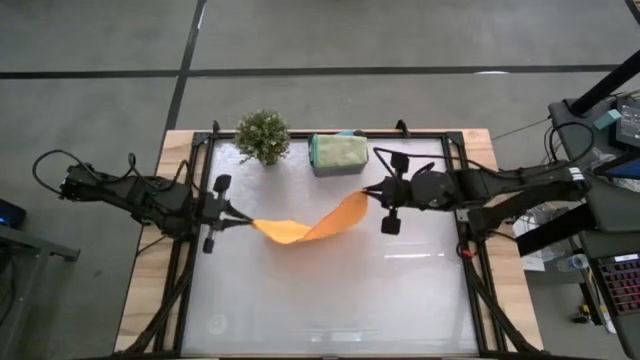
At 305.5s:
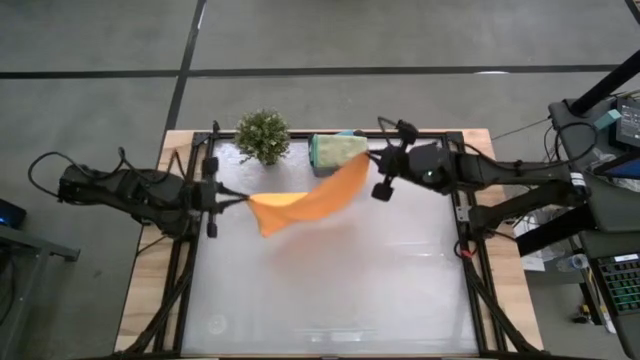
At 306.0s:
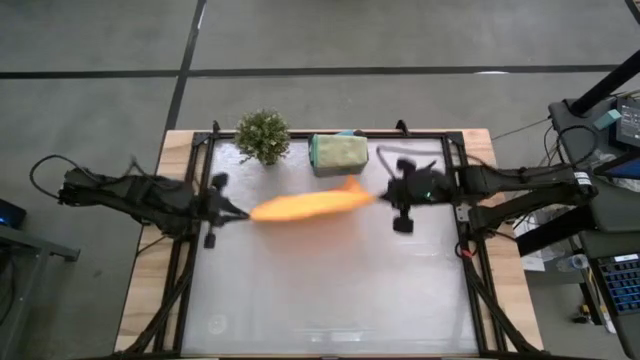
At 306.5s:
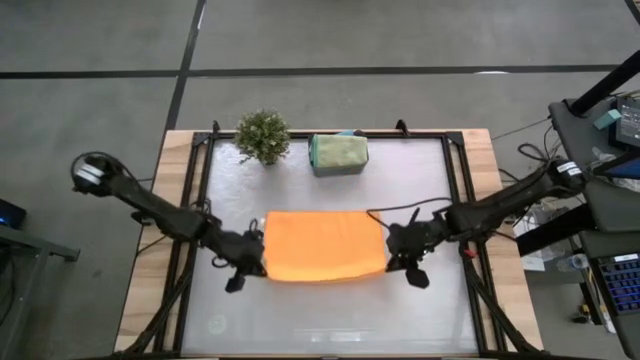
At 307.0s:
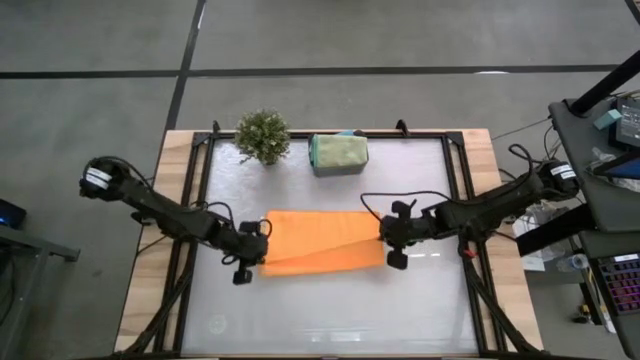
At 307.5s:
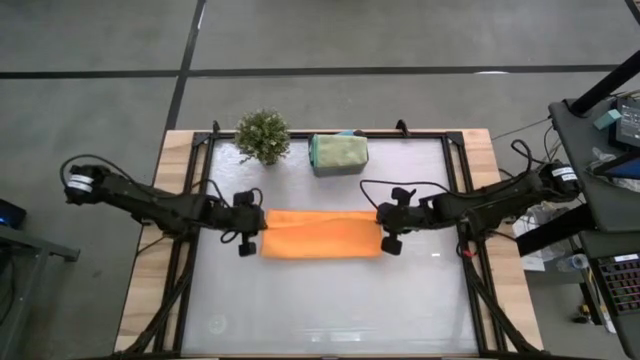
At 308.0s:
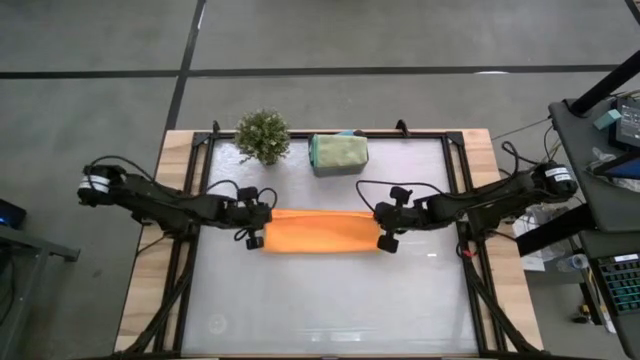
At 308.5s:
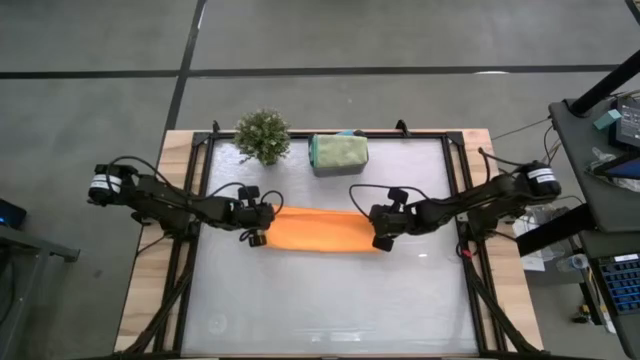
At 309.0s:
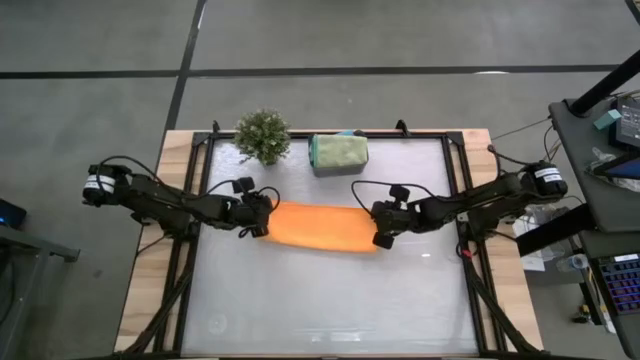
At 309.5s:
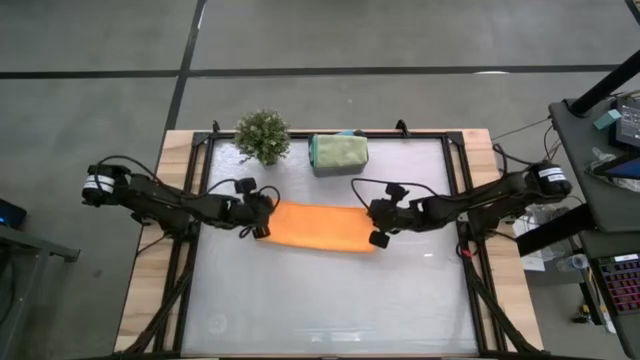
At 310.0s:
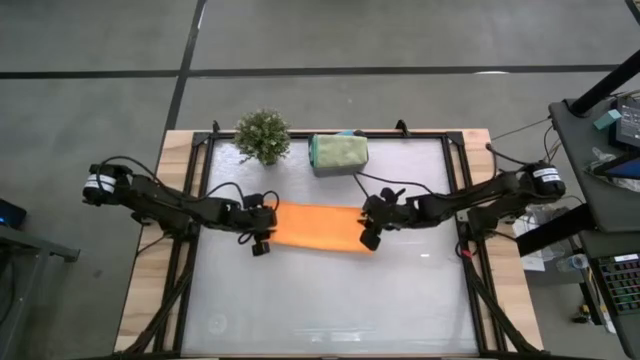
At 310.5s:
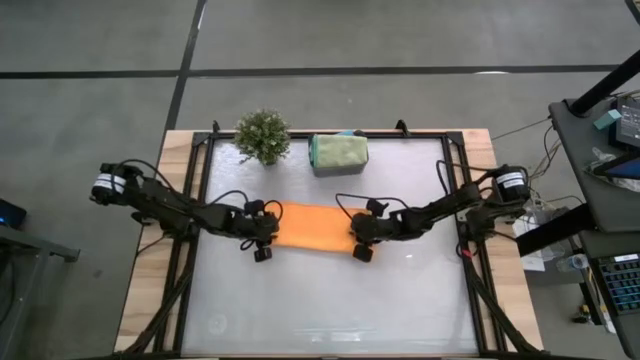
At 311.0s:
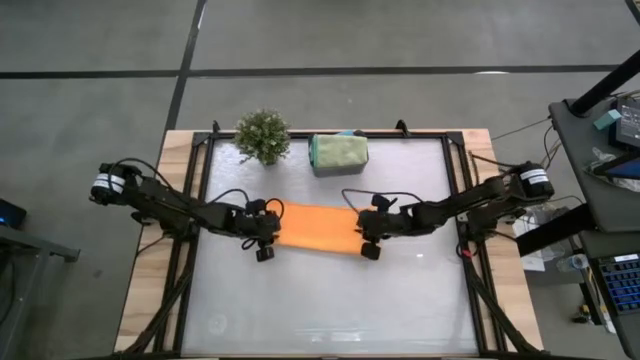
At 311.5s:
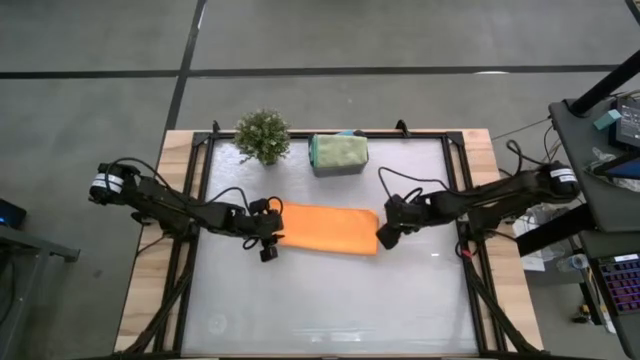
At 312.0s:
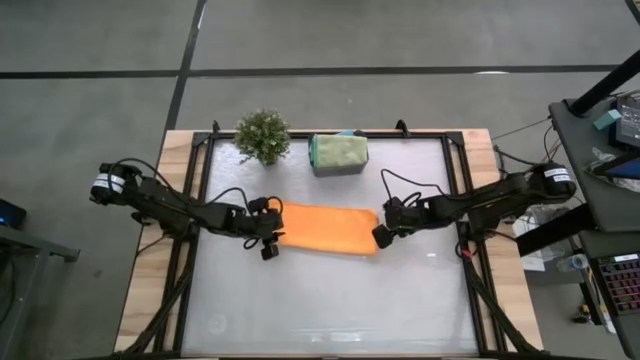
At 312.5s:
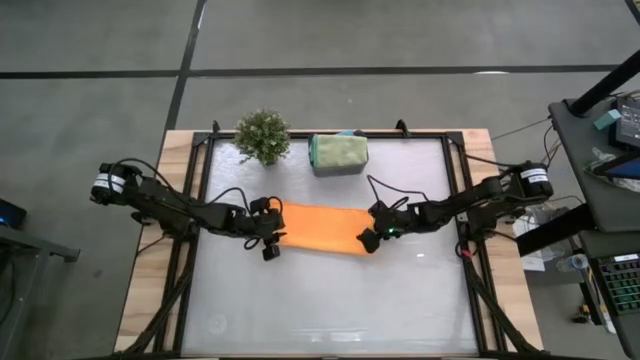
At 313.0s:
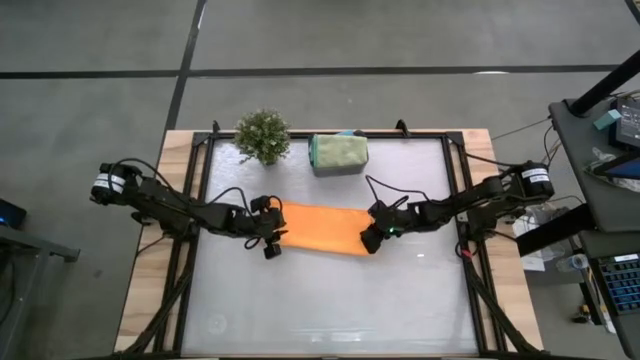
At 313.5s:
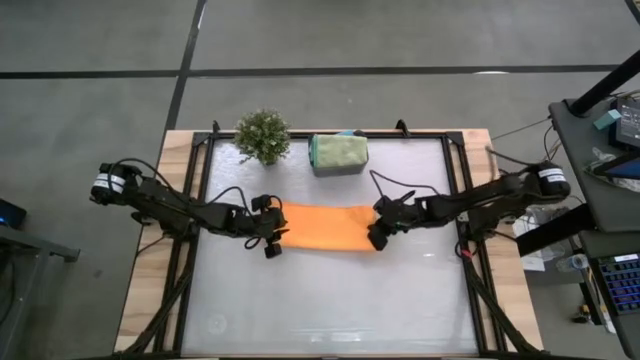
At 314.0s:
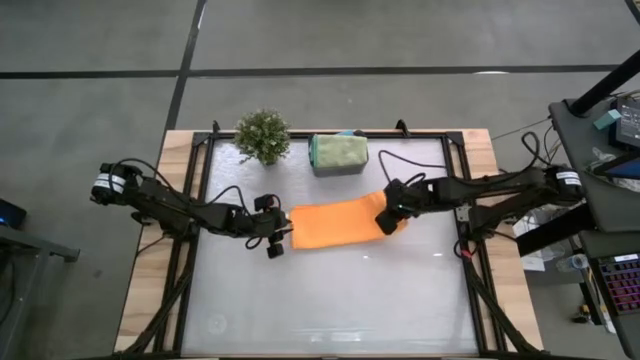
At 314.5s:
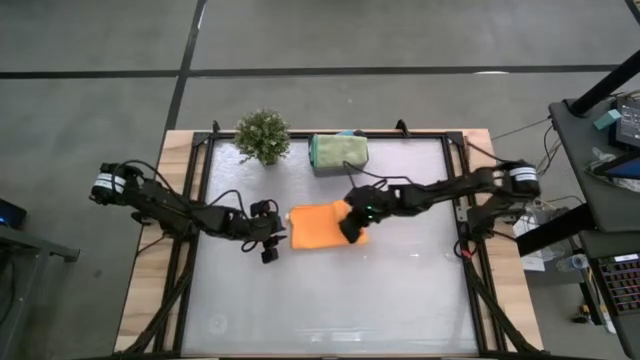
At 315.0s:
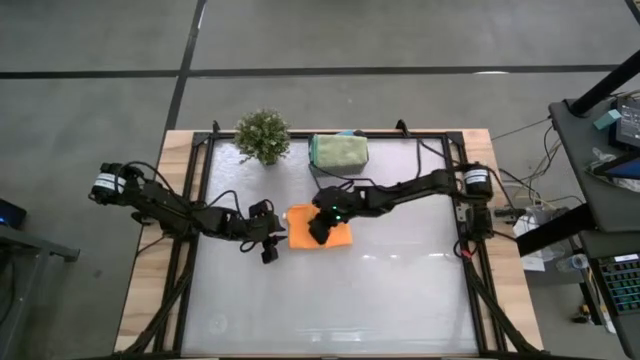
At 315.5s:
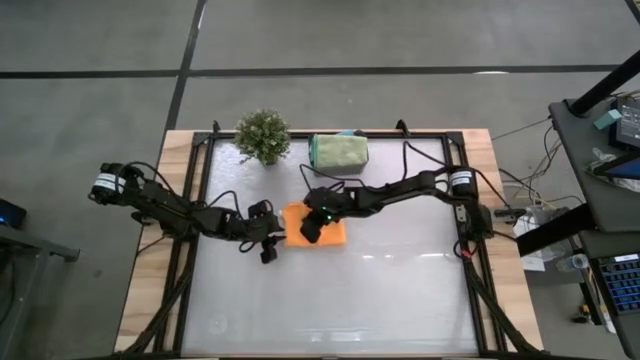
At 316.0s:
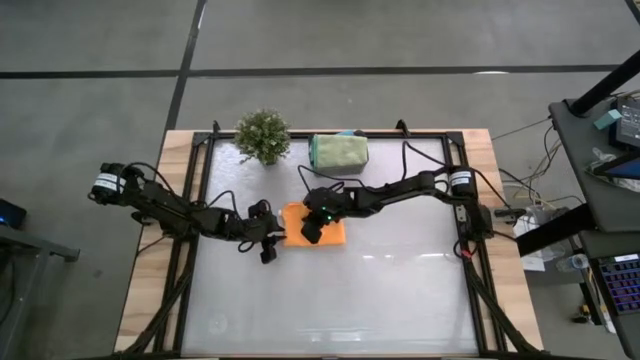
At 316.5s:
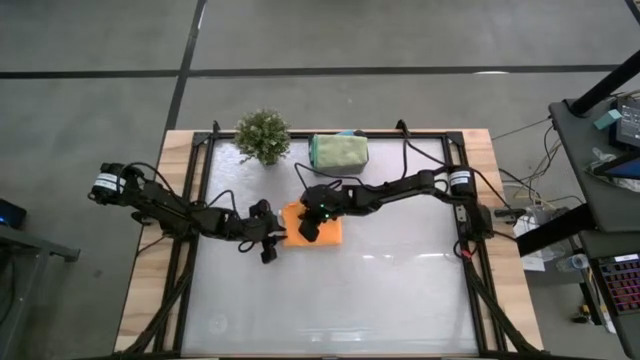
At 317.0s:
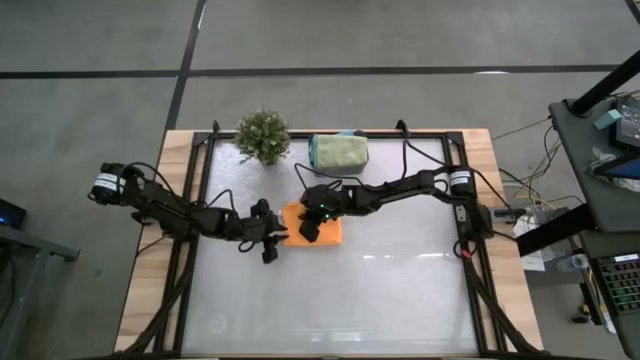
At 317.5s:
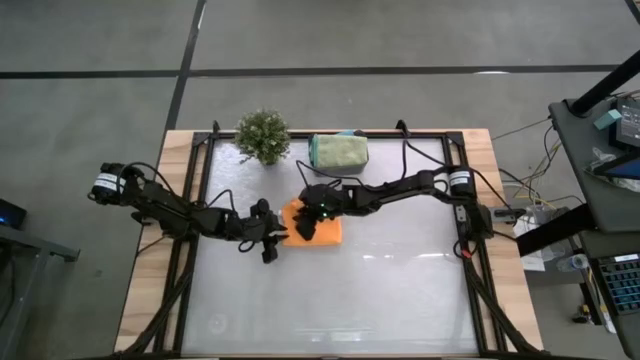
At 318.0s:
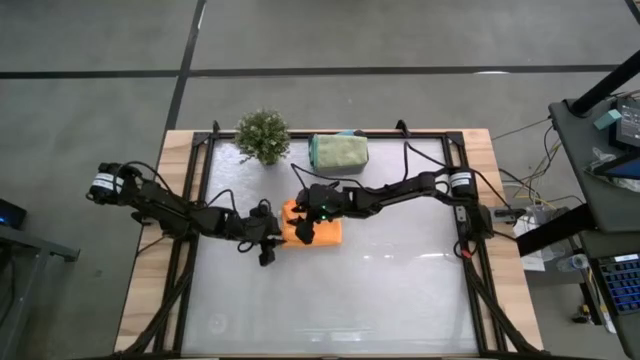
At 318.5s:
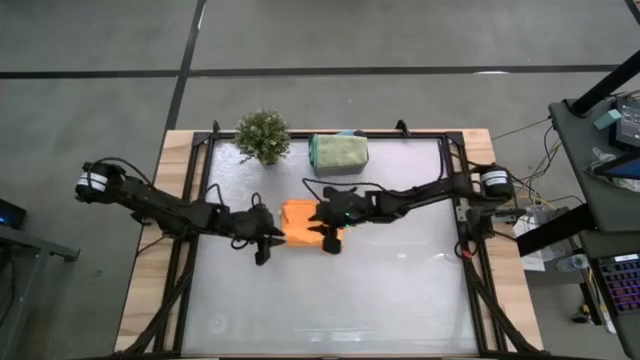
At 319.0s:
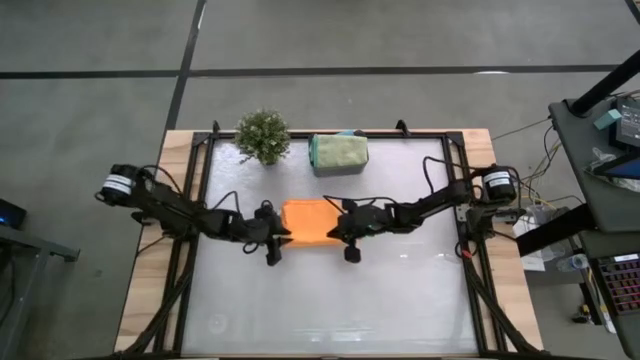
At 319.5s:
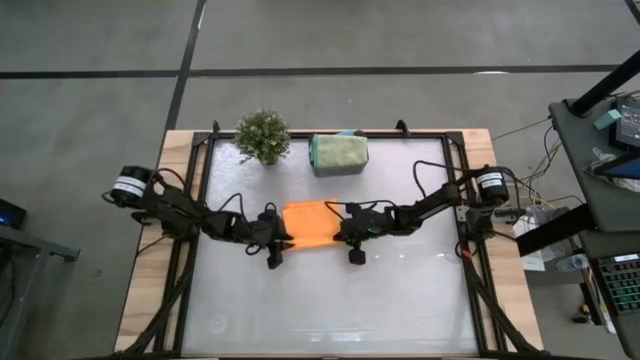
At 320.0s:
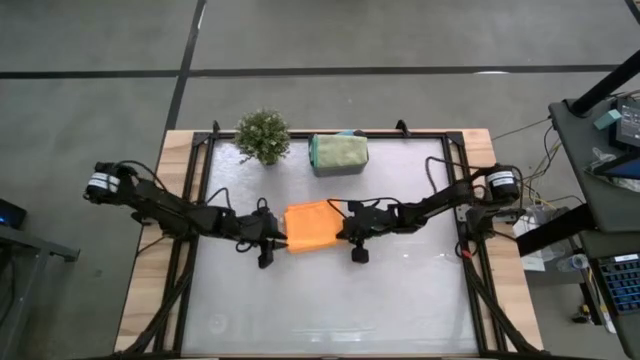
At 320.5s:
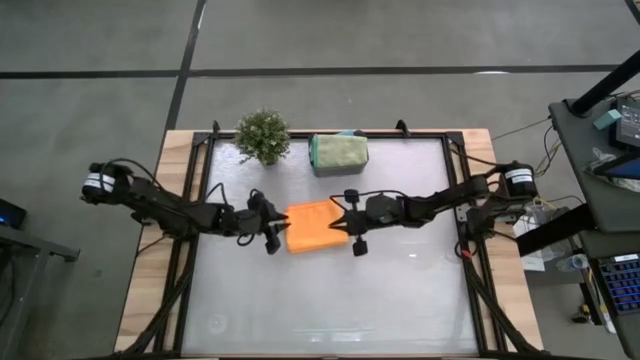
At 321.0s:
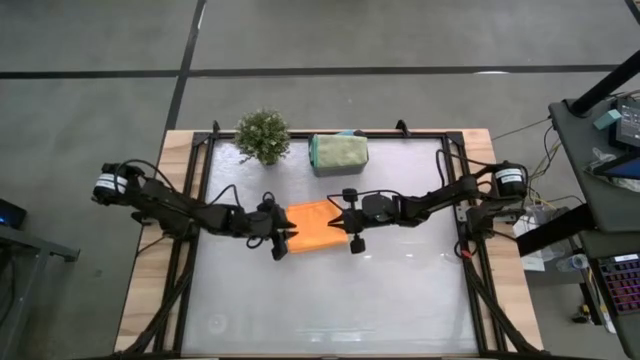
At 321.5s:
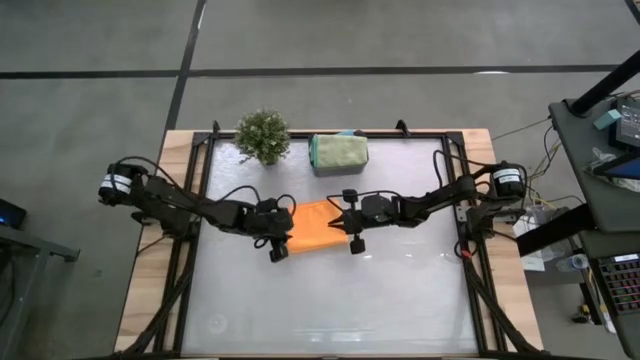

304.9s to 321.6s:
Task: Fold microfiber towels
Fold the orange towel

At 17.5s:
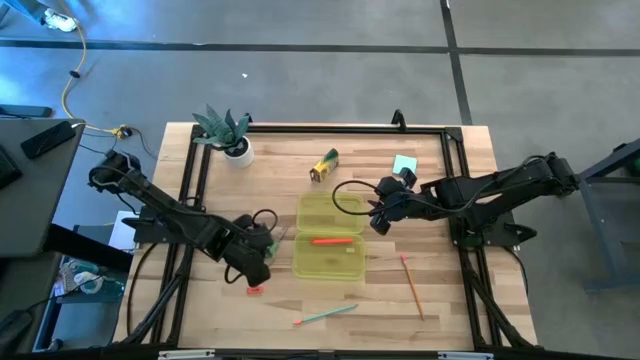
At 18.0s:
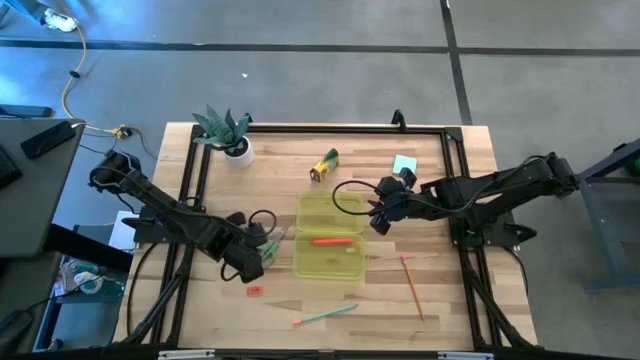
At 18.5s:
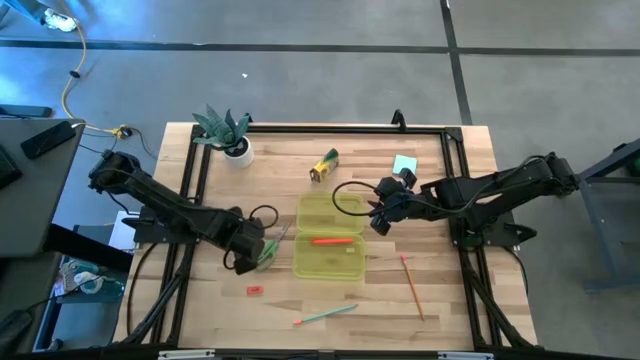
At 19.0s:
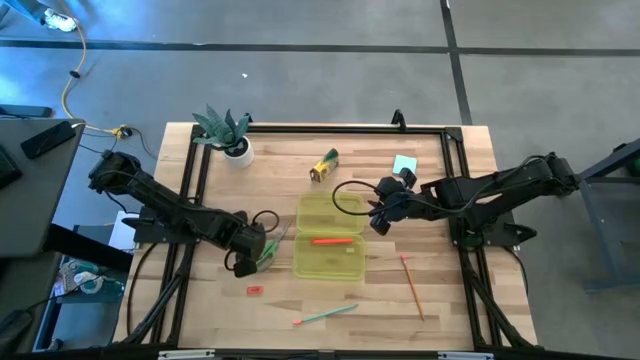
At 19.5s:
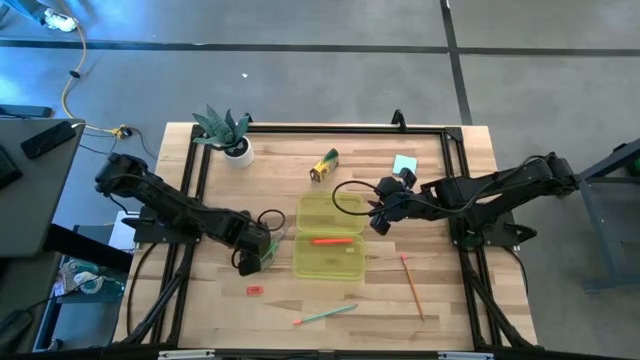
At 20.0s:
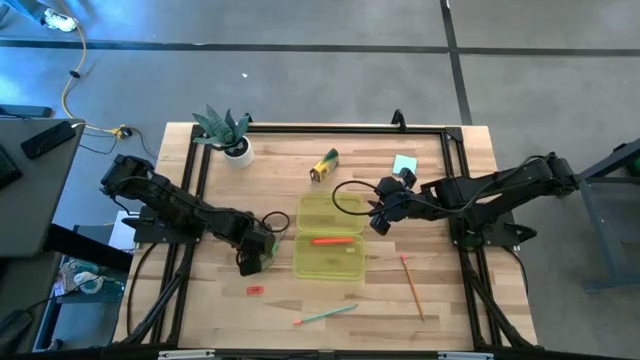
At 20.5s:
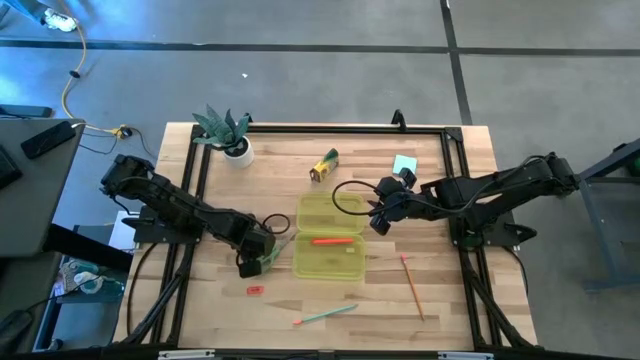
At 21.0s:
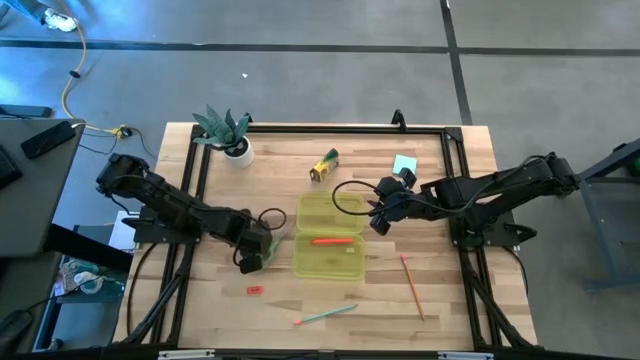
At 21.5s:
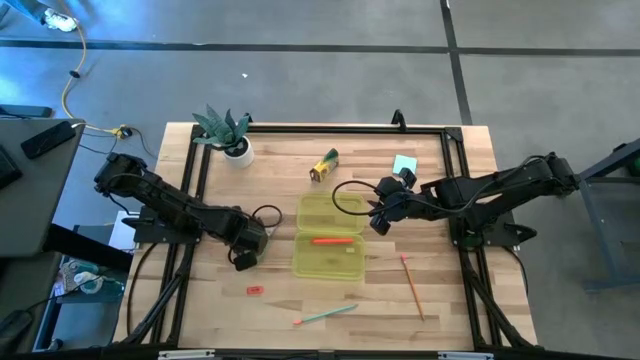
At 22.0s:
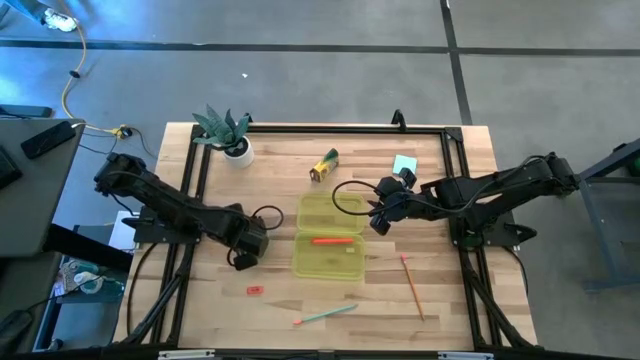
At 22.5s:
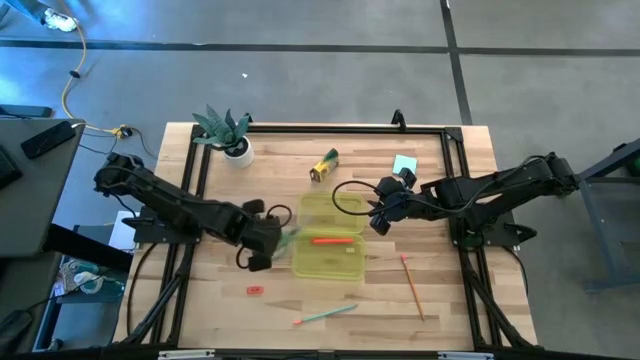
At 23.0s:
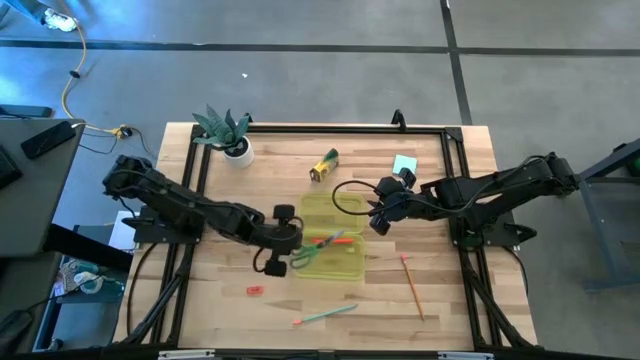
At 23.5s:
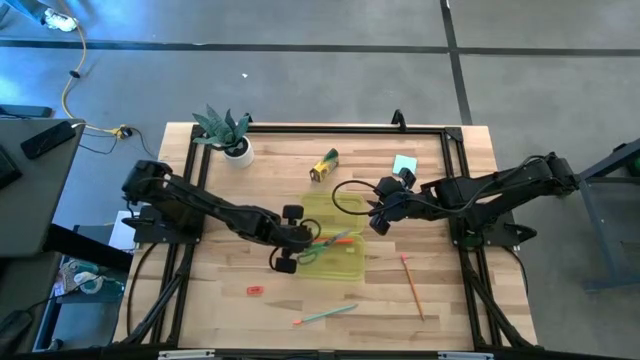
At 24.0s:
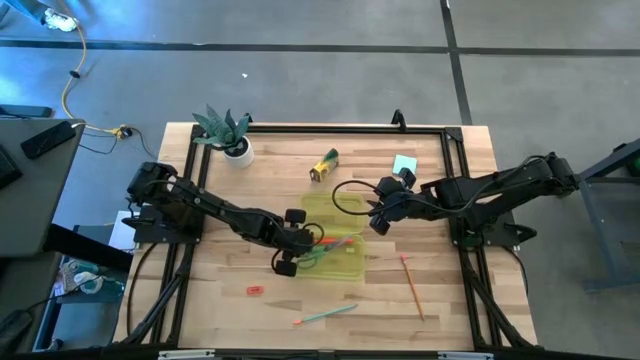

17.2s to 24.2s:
Task: Pack school essentials
Put the green scissors into the yellow box
